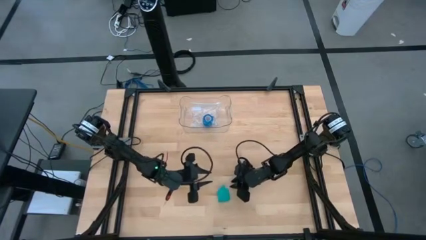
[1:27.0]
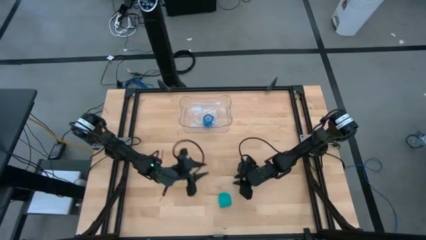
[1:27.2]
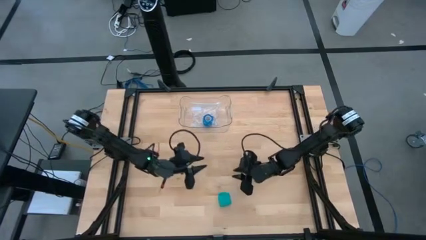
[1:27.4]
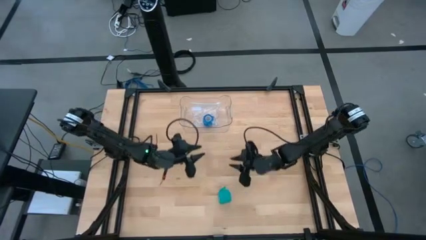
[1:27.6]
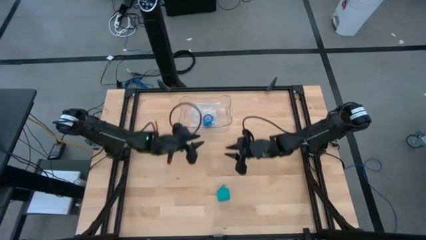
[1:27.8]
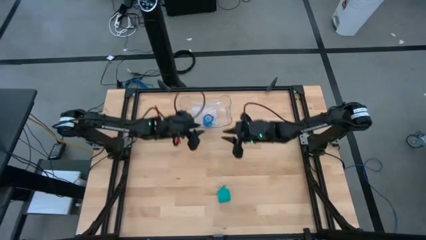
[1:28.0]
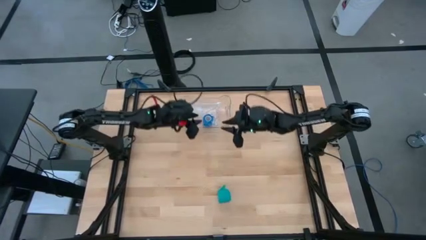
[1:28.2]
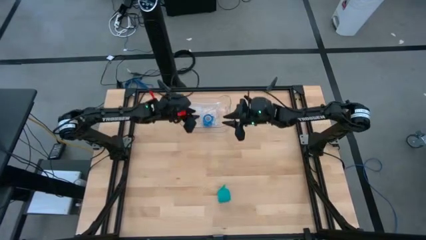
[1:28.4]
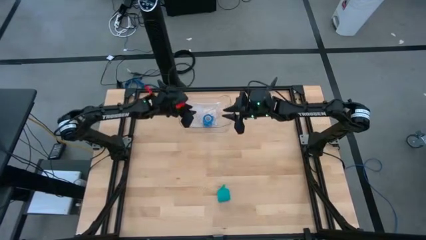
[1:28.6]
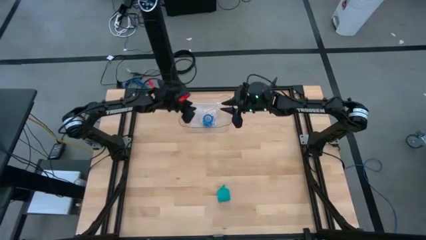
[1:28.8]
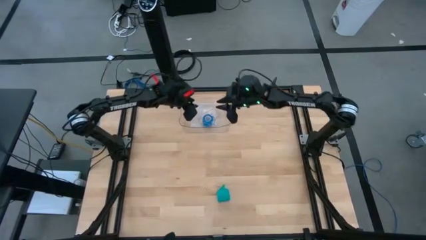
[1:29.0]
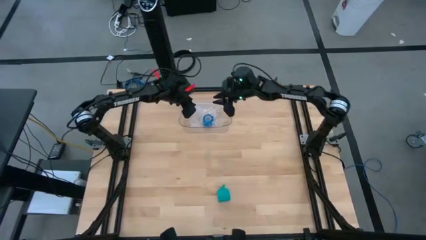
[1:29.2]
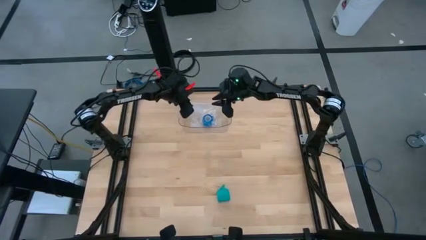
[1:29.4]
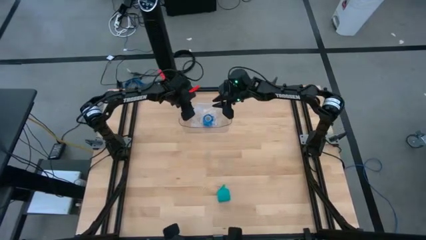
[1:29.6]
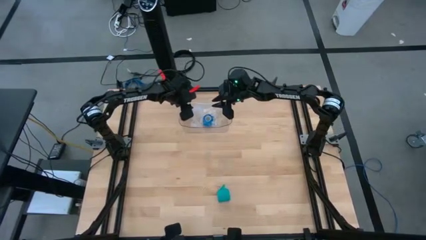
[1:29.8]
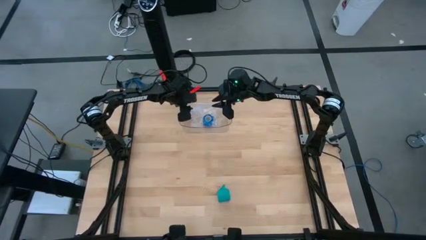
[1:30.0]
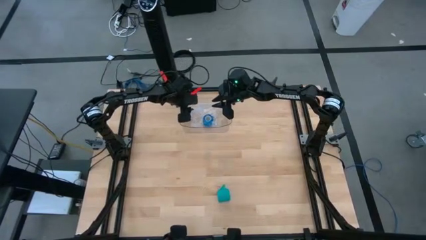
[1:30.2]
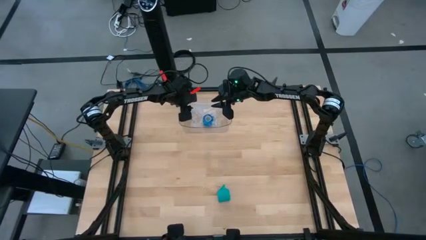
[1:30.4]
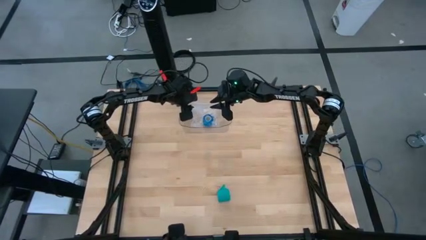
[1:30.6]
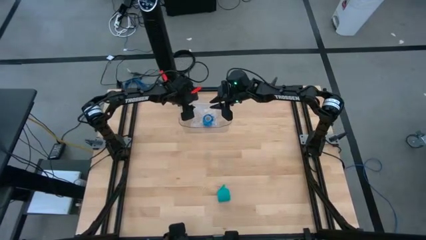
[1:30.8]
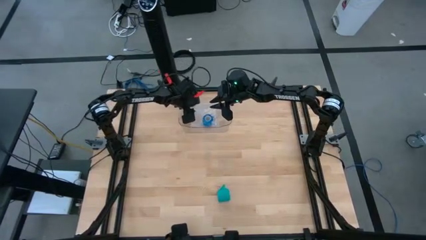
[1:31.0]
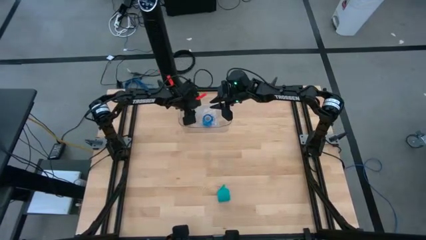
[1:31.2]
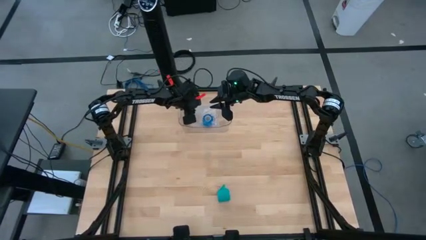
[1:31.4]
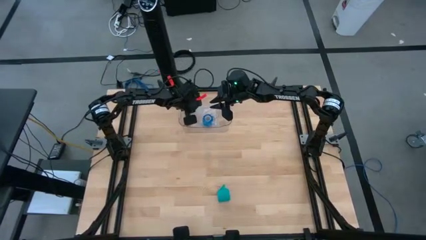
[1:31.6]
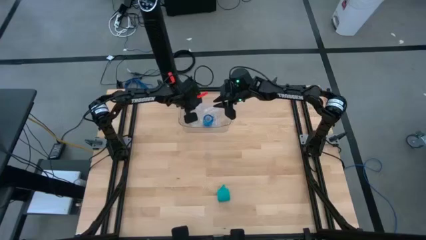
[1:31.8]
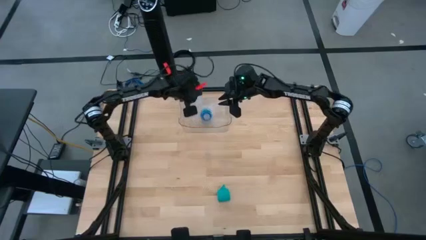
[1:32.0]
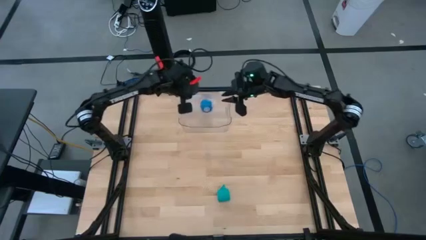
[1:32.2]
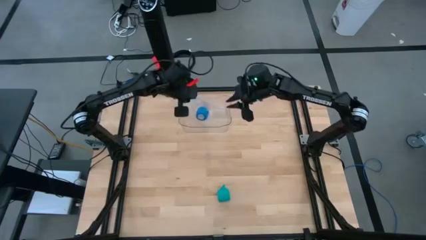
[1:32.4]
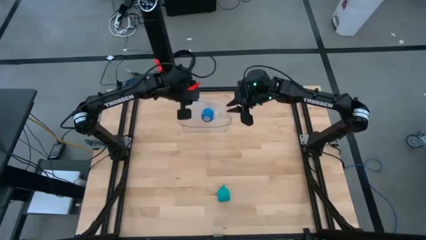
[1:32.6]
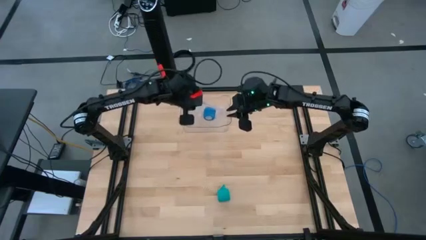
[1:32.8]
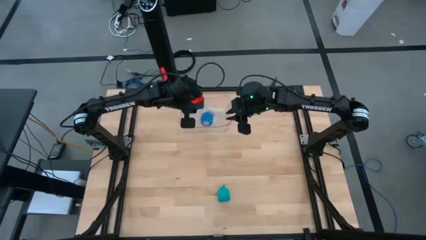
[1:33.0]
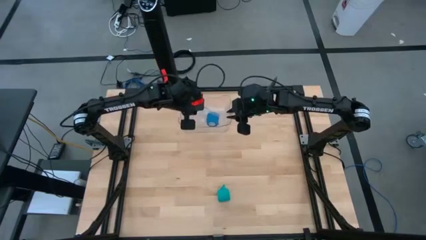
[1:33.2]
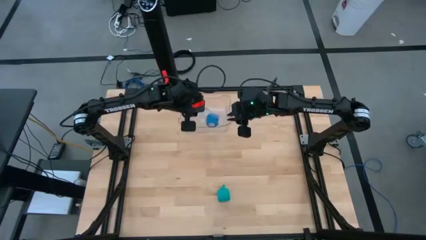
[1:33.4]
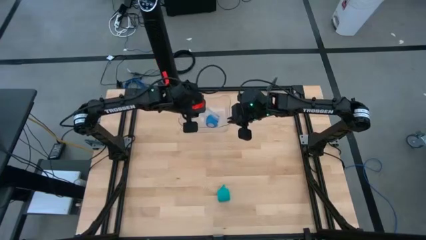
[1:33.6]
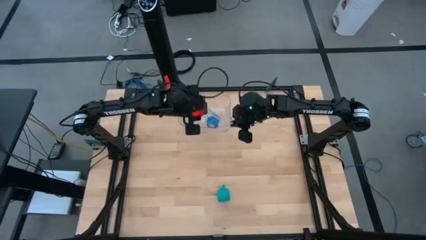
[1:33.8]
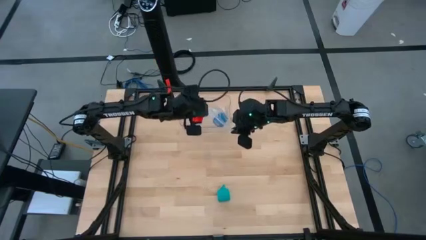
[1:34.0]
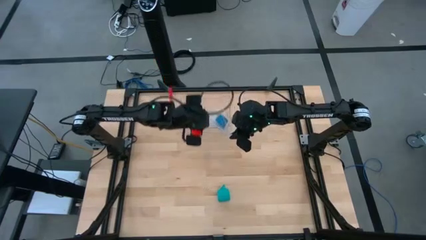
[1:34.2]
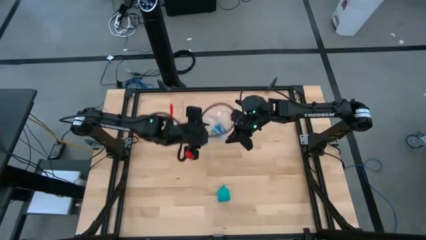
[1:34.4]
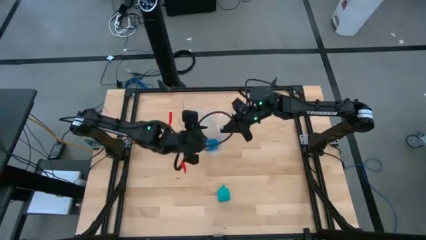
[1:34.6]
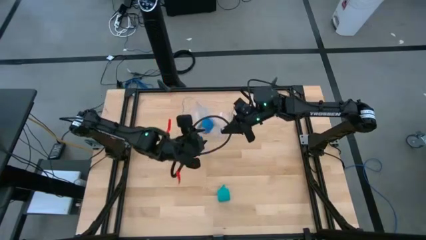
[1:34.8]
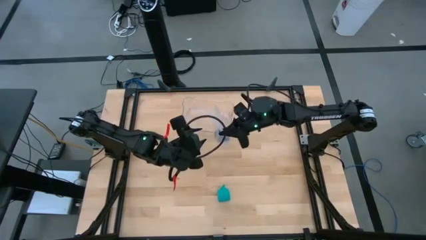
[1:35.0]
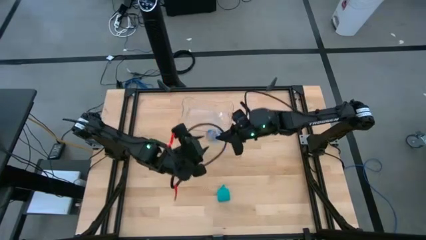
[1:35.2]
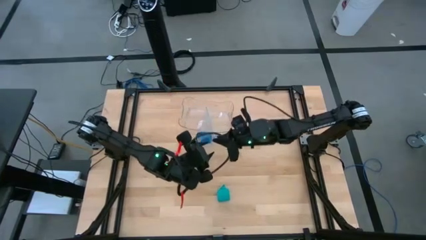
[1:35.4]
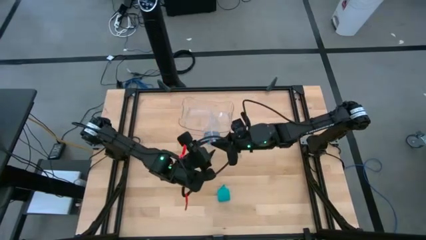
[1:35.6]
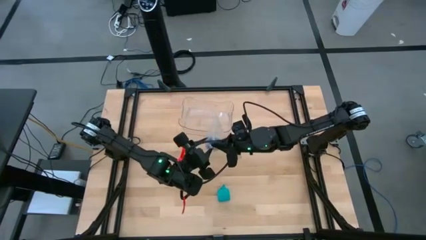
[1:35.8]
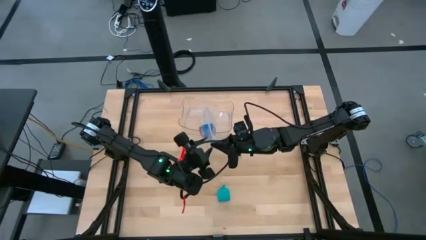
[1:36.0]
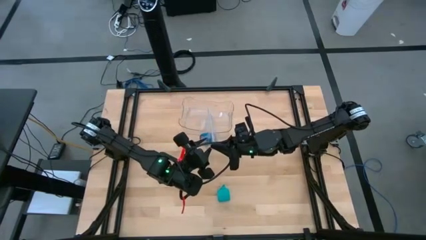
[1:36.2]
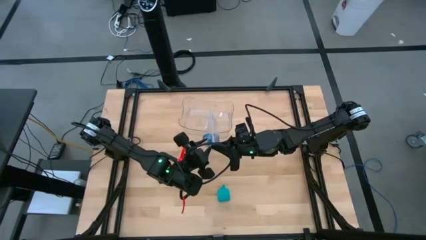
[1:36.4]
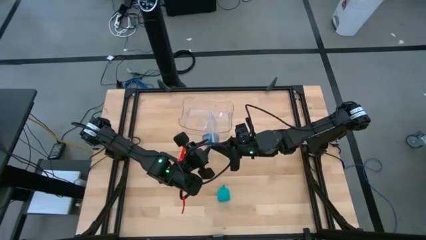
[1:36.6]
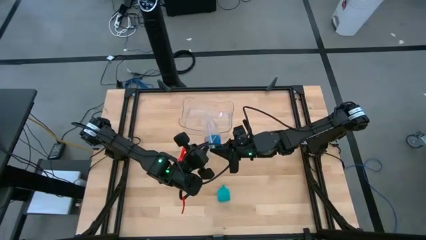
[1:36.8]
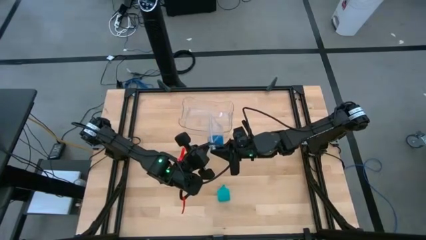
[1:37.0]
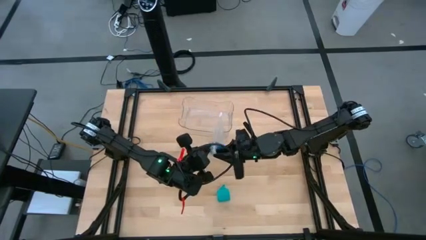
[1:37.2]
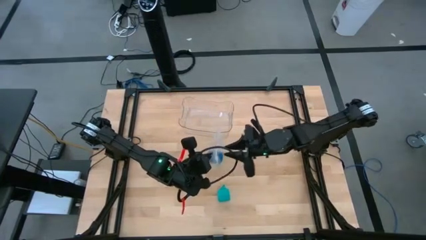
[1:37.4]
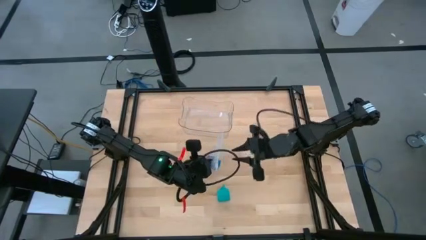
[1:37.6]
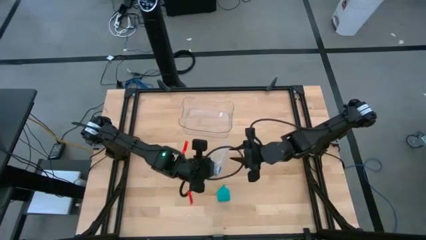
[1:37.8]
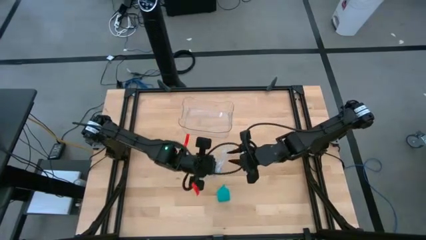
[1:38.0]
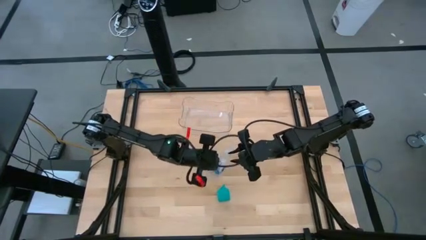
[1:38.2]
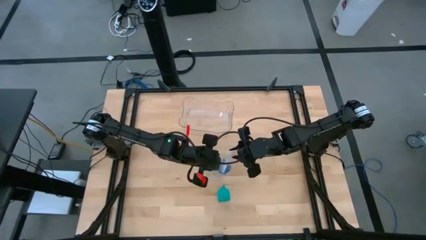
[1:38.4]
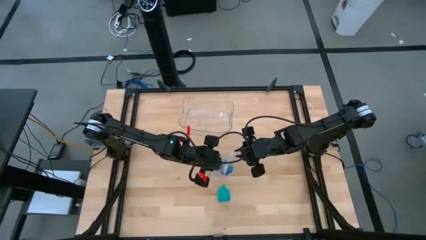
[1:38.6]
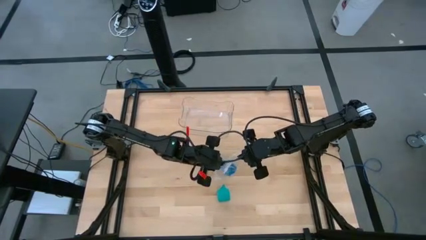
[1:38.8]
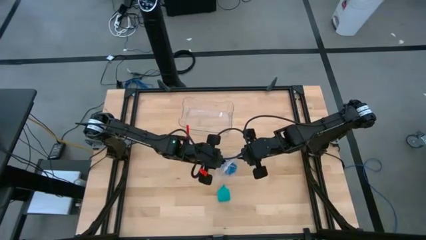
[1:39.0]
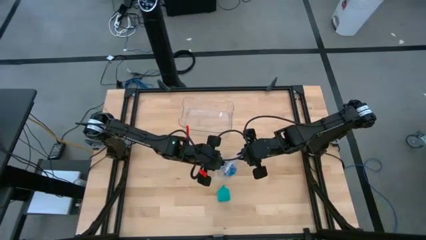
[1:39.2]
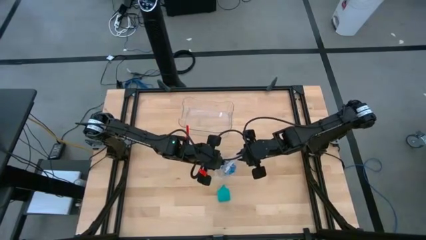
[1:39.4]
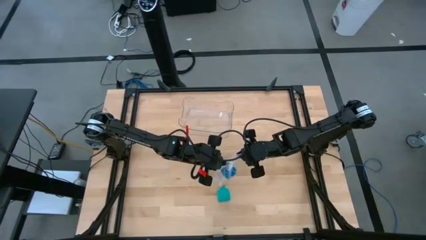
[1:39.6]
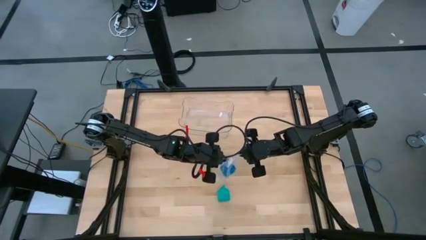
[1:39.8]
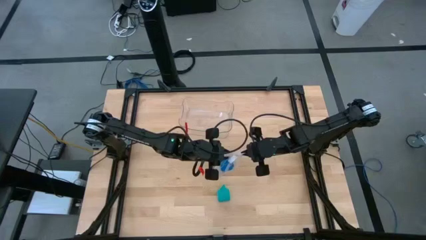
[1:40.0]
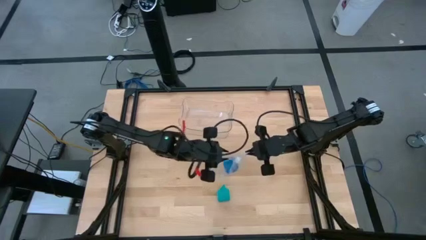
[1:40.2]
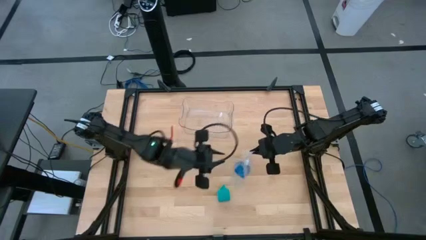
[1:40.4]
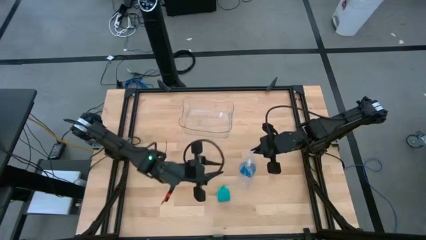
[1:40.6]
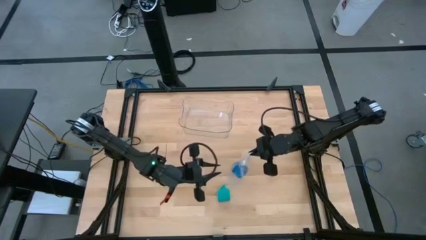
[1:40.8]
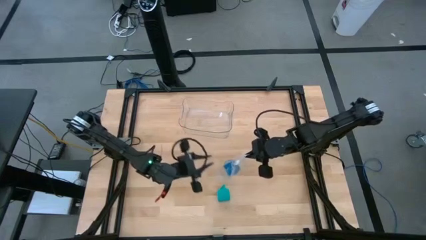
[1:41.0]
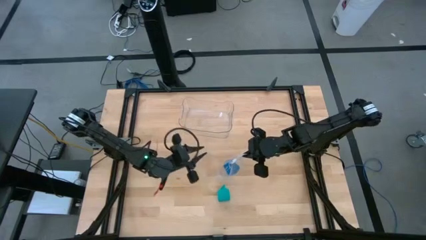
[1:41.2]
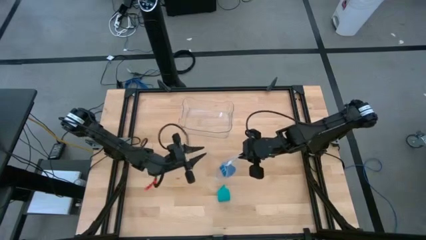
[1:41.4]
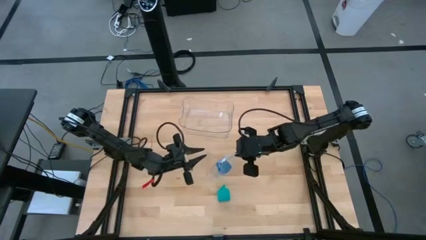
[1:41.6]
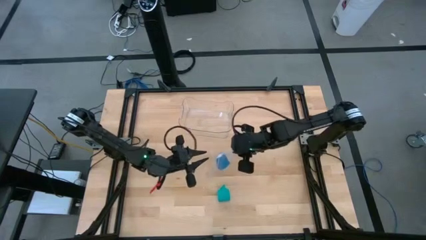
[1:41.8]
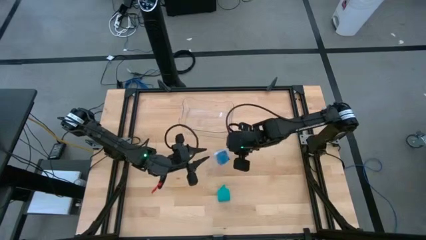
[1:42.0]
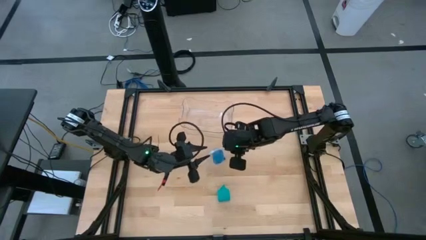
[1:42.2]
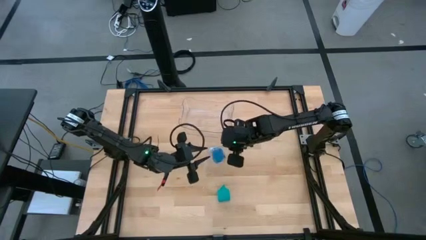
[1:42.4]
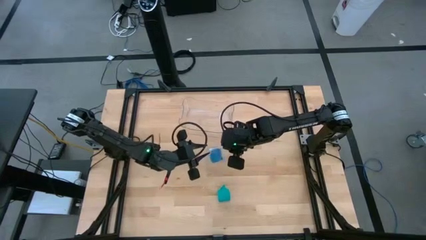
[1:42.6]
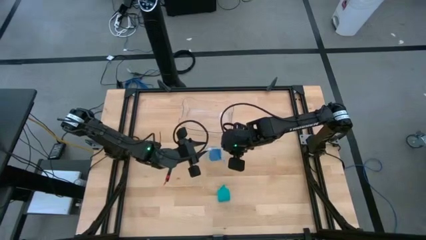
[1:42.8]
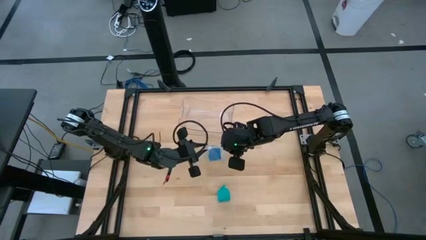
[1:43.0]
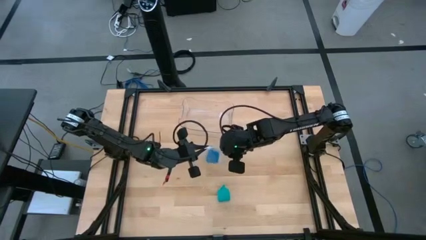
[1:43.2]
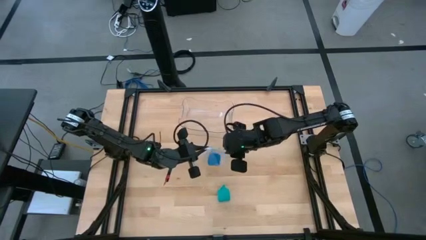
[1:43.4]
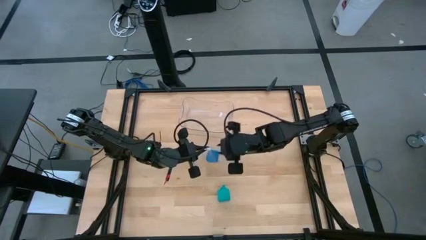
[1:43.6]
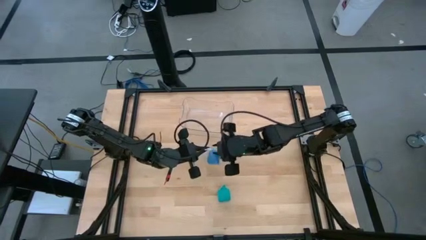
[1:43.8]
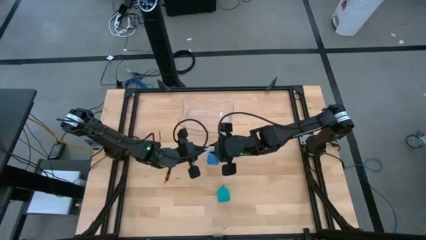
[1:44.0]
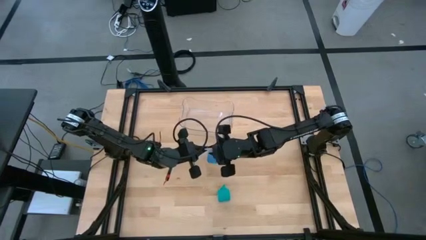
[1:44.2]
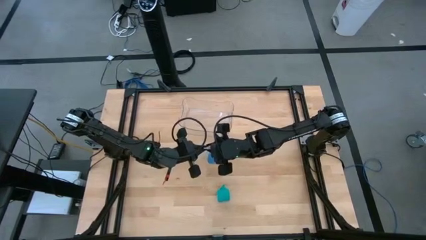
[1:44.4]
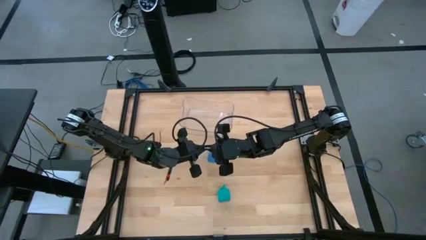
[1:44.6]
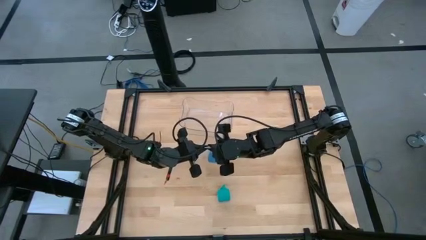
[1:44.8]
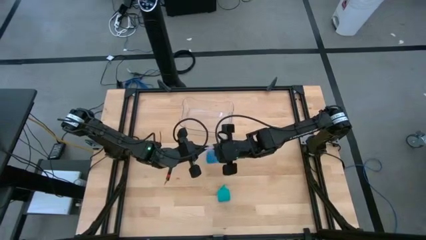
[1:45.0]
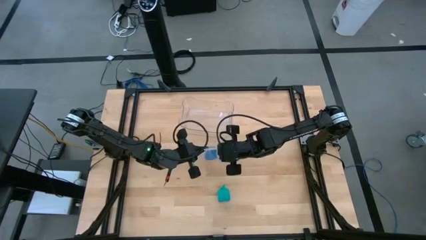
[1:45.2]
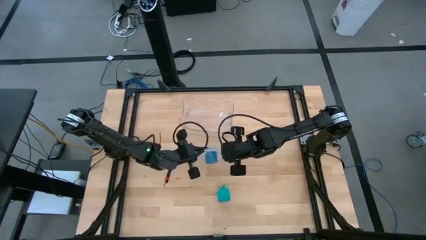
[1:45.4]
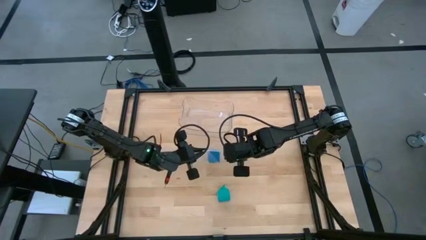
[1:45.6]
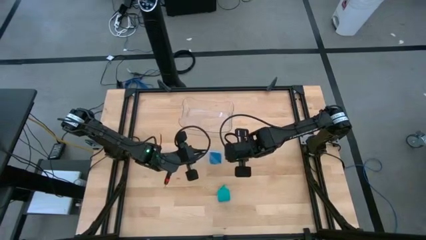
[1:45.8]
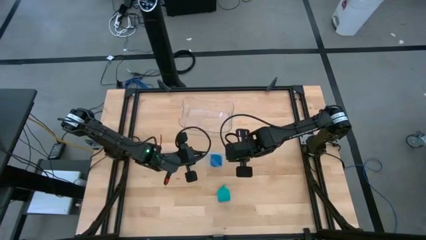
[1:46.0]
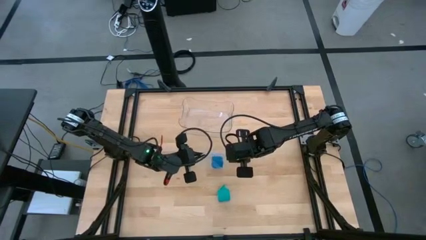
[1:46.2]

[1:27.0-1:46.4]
Task: Roll bandage
Open the transparent zip bag
